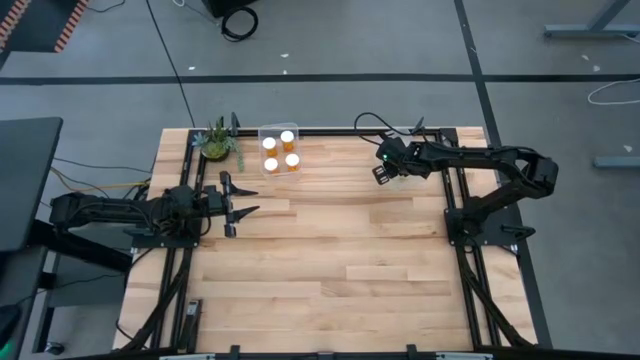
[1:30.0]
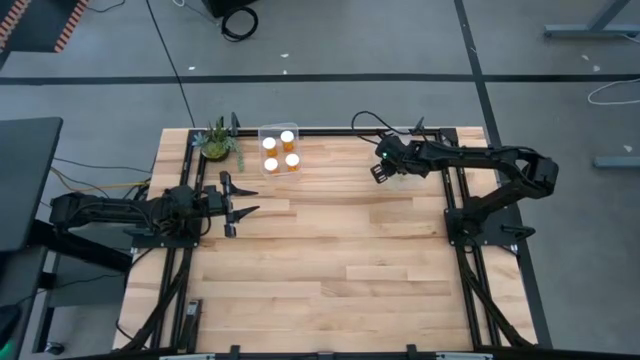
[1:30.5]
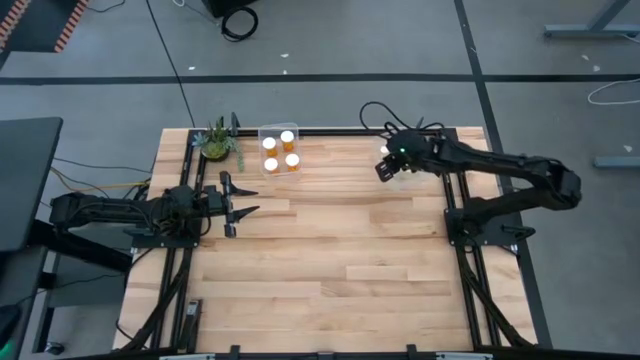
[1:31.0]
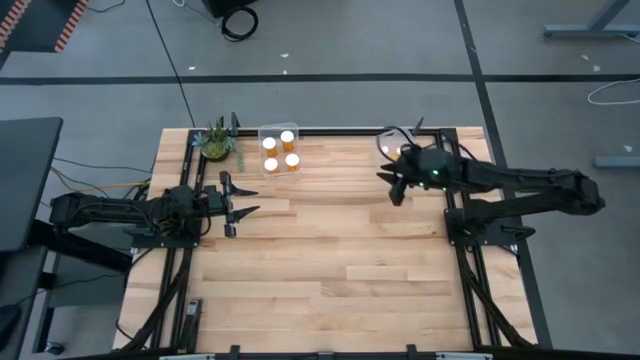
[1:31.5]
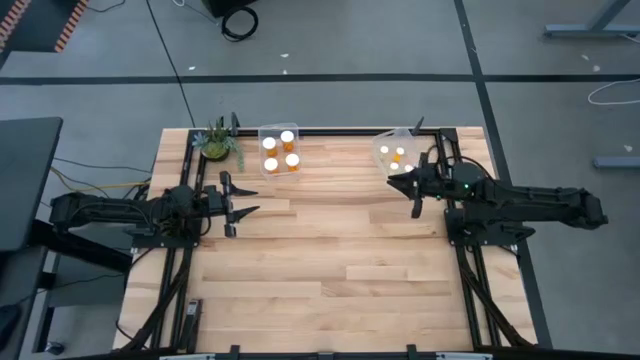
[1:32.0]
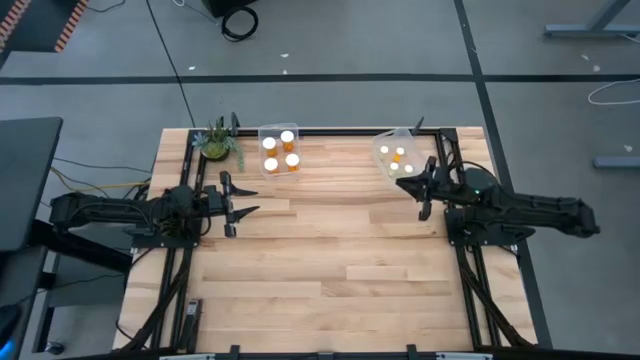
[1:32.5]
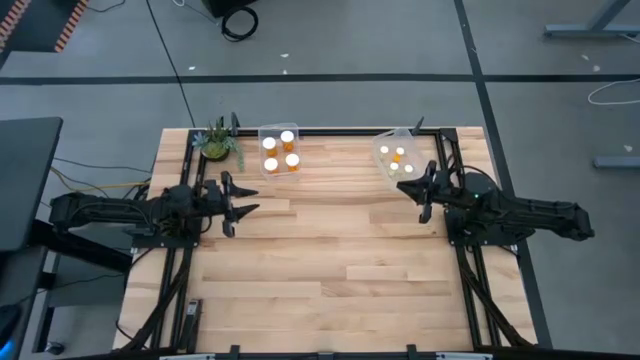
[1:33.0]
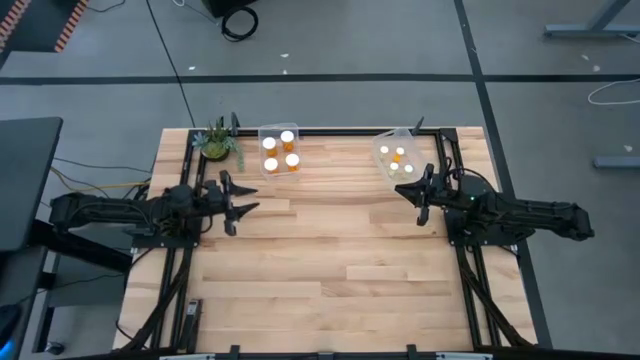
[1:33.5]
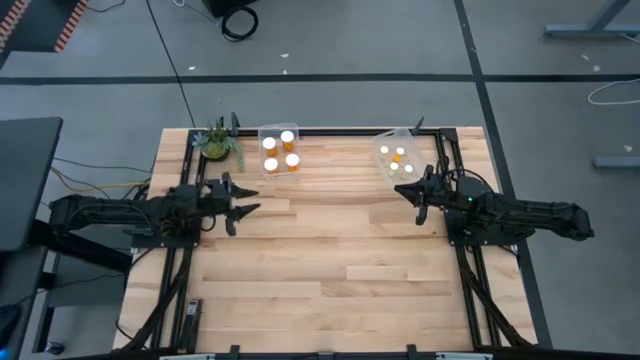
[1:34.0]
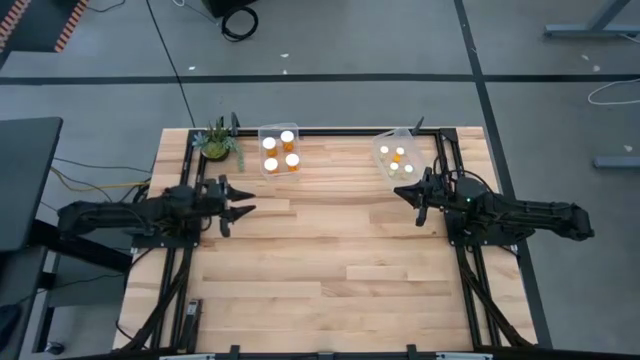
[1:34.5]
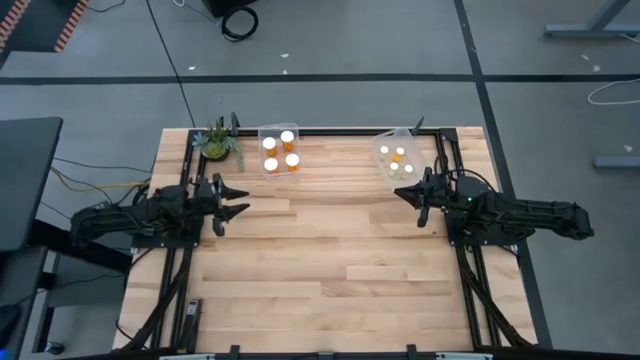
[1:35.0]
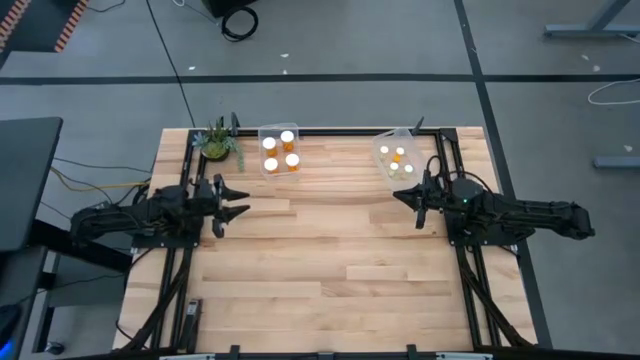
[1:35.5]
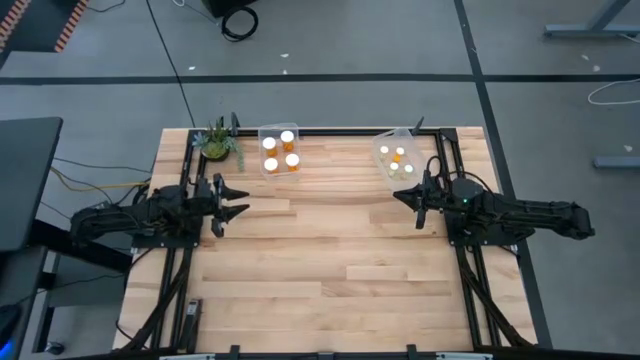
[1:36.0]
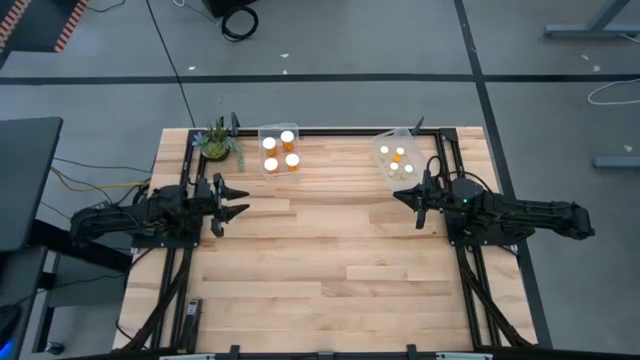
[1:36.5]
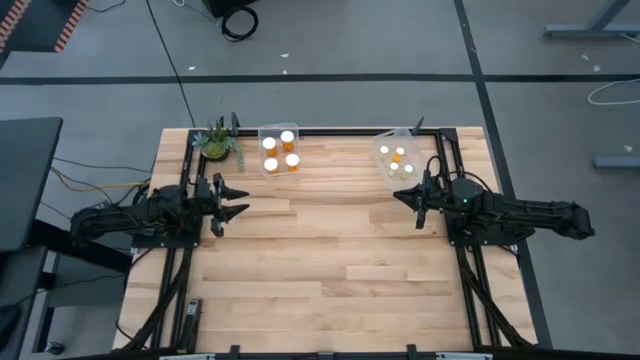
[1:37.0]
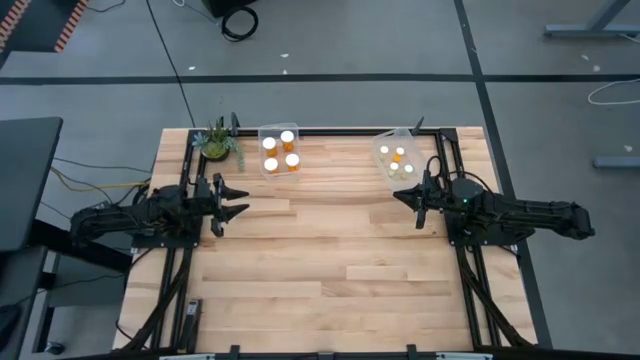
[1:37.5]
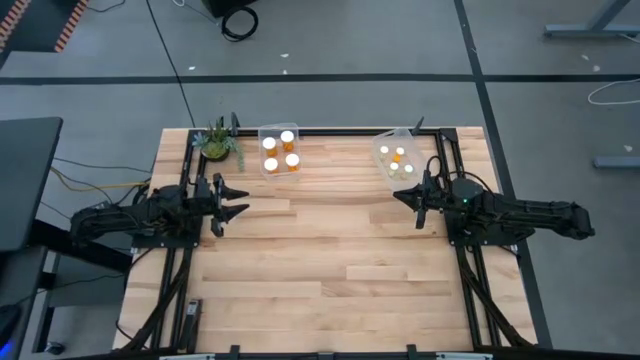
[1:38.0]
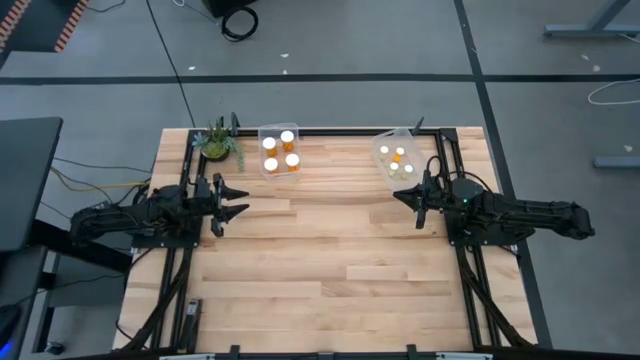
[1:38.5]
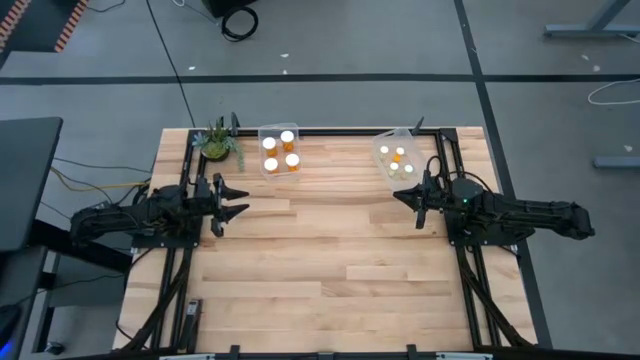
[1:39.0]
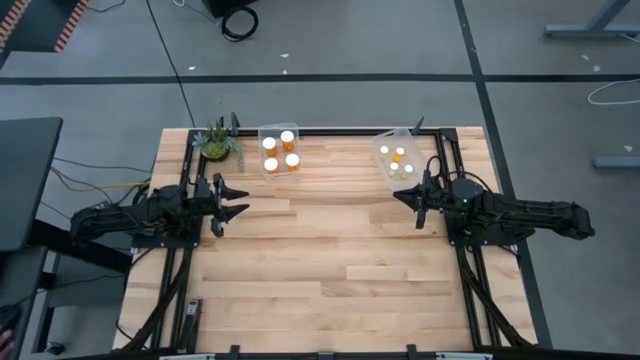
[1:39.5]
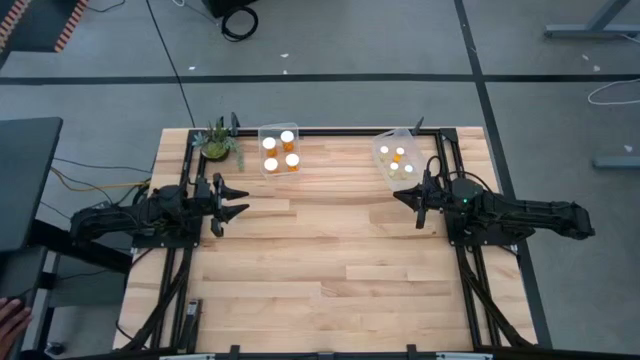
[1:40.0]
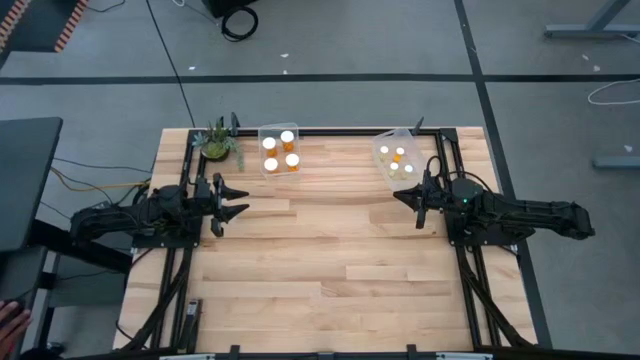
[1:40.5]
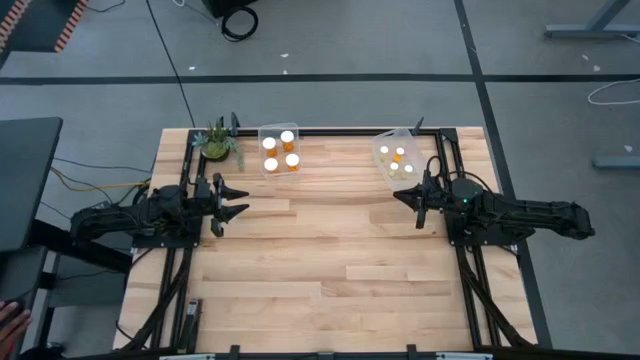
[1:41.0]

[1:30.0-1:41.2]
Task: Pick and place medicine bottles into bin by pill shape (circle, oval)
Return to Home Position

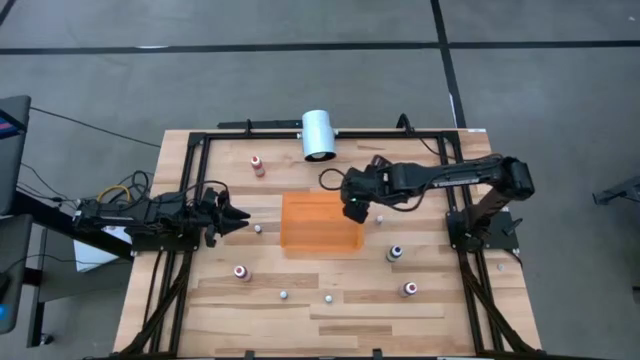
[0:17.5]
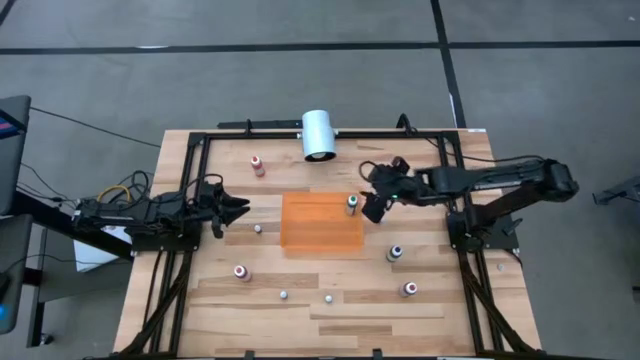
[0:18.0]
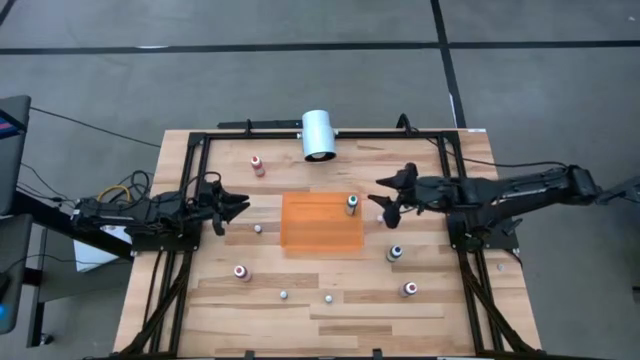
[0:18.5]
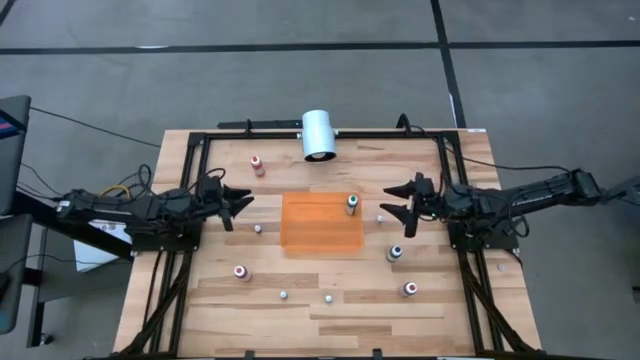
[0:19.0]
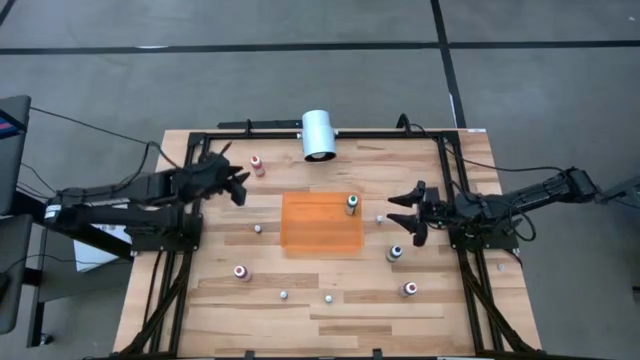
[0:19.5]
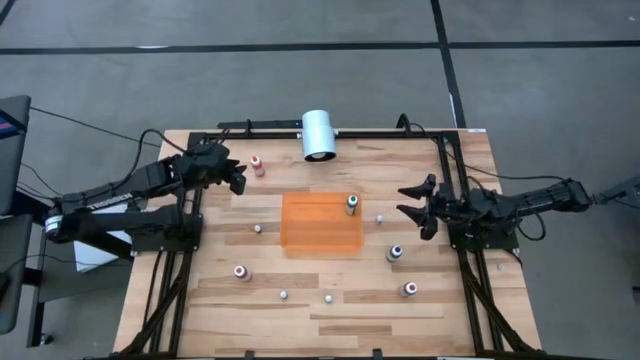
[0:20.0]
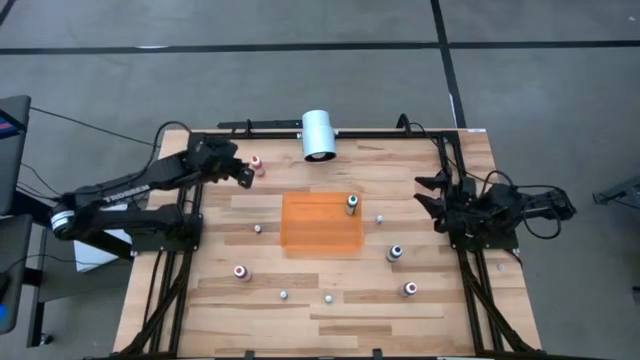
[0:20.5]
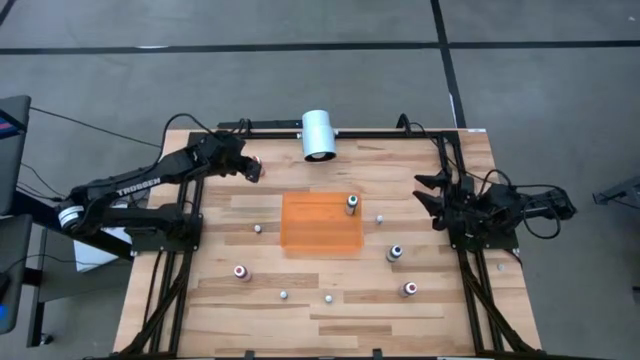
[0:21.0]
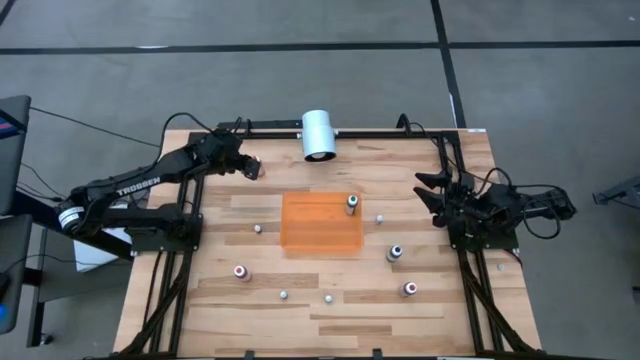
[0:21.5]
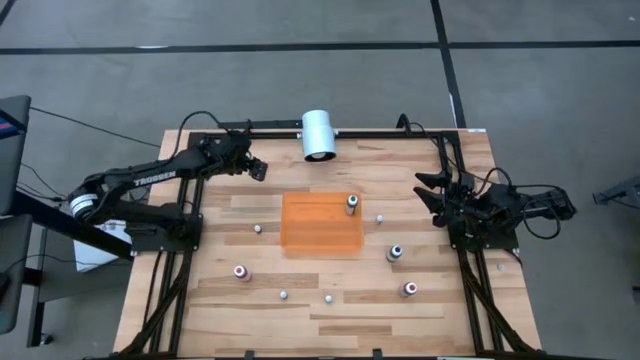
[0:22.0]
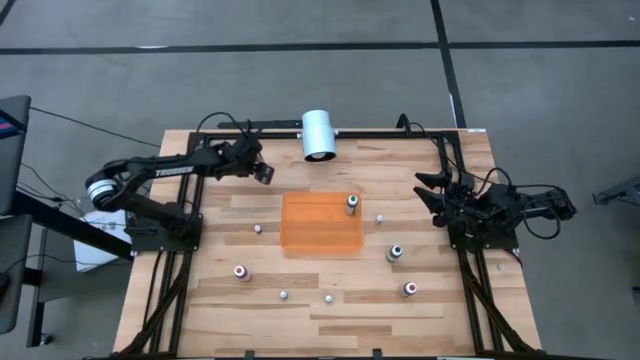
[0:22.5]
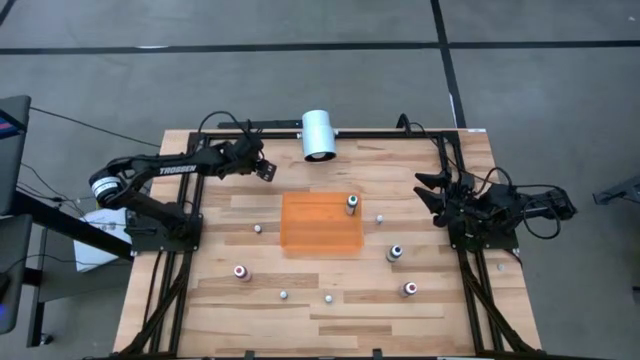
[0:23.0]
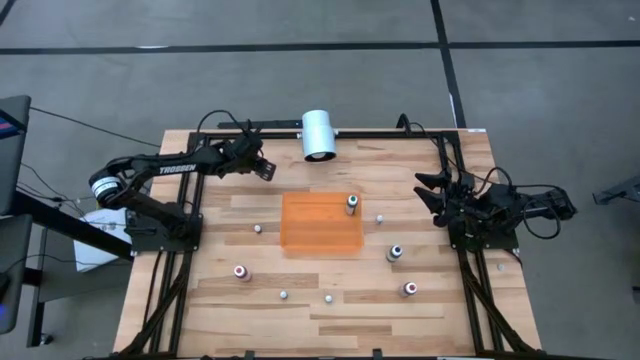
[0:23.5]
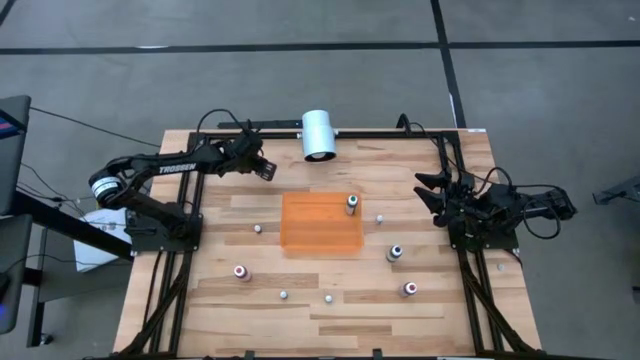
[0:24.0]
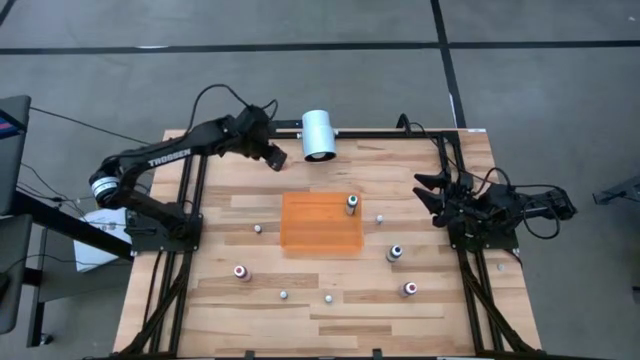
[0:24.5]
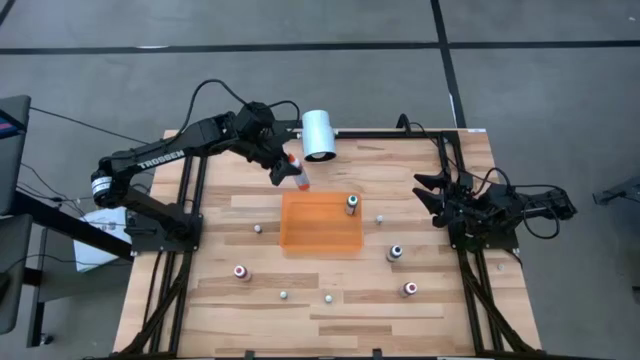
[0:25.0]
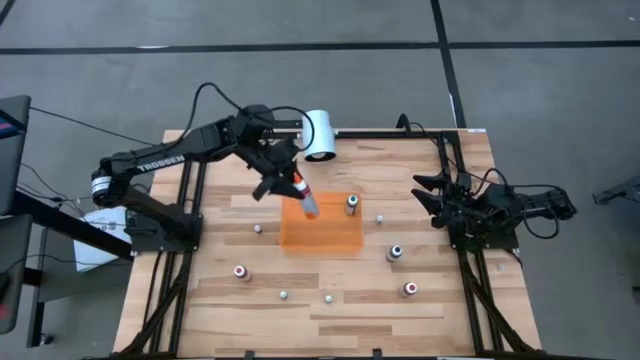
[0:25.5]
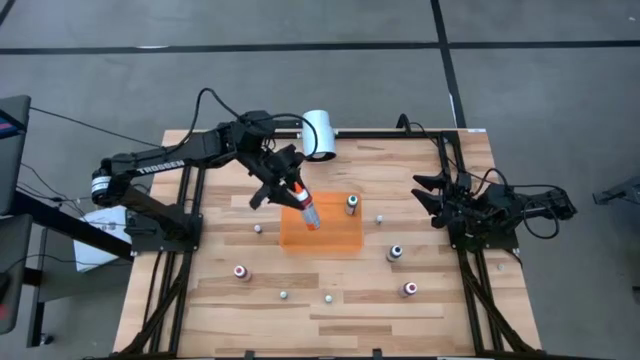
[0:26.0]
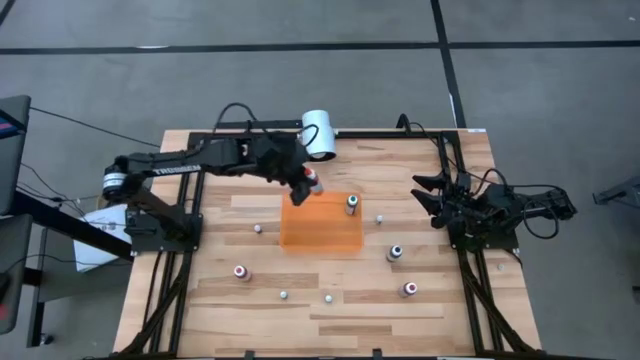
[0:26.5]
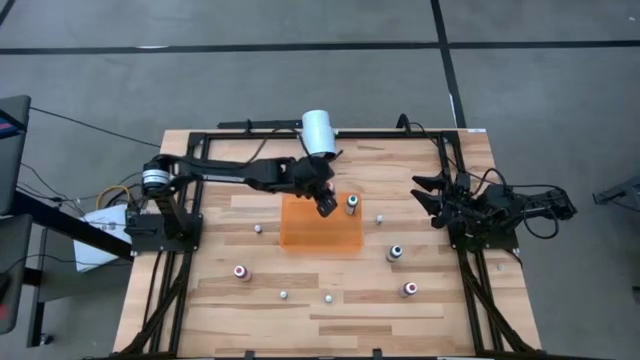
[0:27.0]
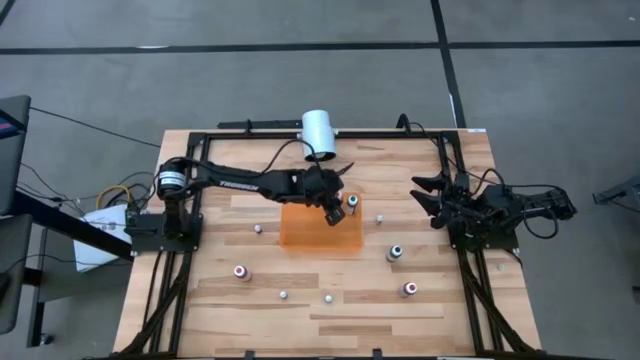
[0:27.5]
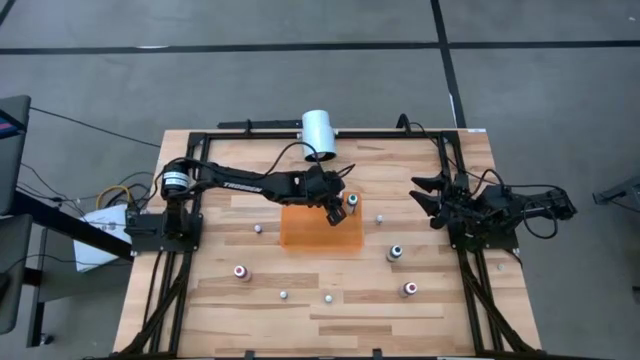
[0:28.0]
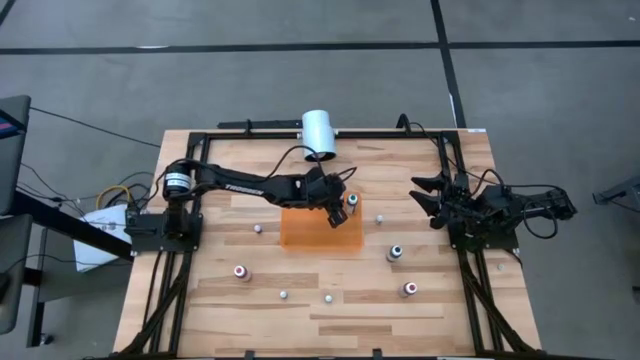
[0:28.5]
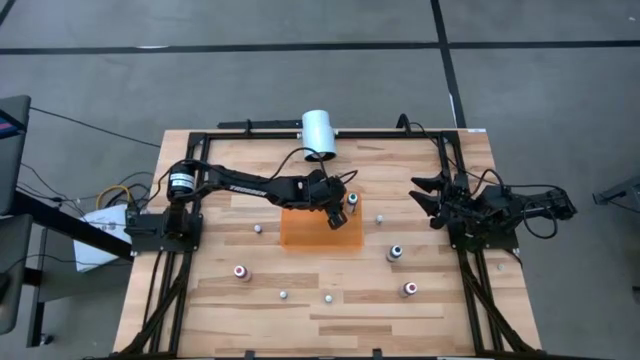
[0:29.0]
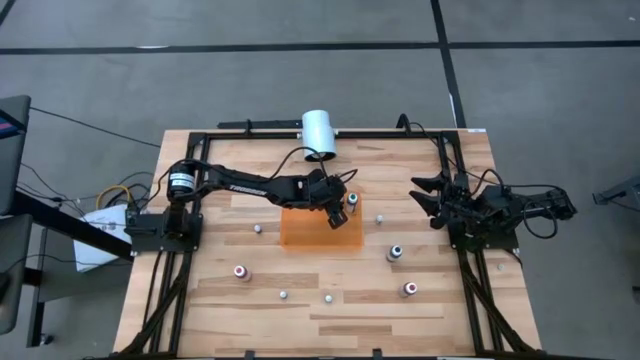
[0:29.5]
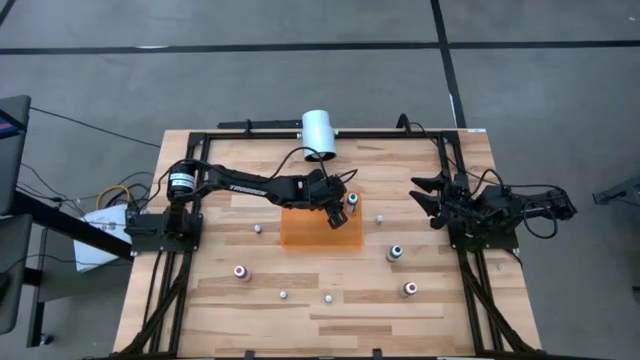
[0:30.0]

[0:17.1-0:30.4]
Task: Pick & Place food coloring
Put the large orange food coloring bottle into the orange bin
